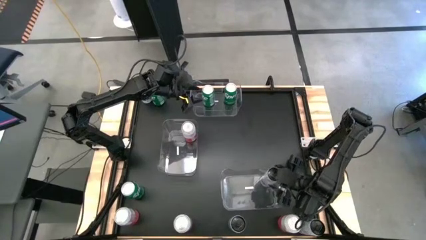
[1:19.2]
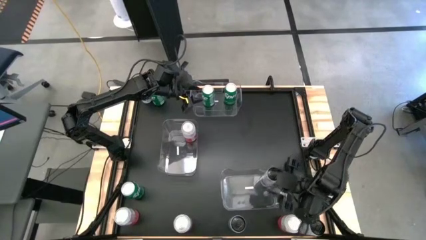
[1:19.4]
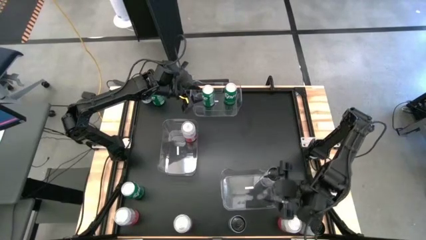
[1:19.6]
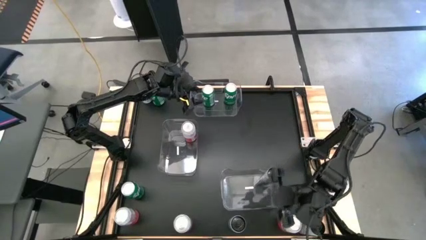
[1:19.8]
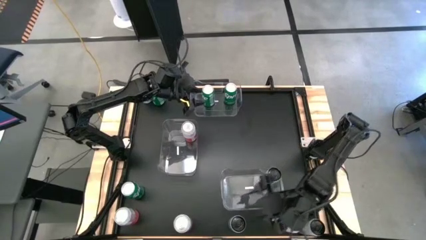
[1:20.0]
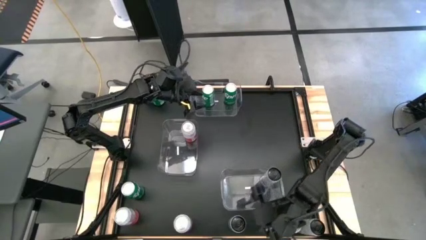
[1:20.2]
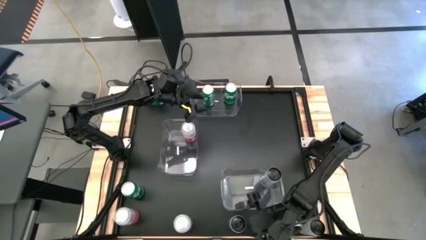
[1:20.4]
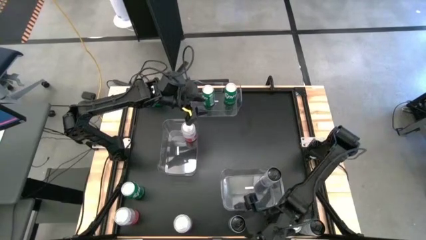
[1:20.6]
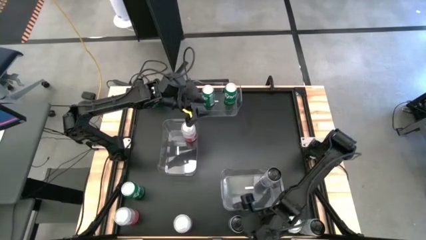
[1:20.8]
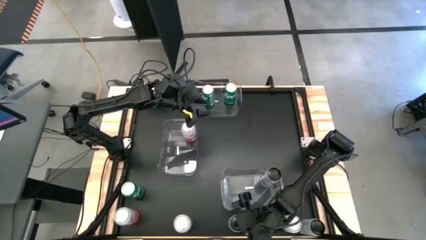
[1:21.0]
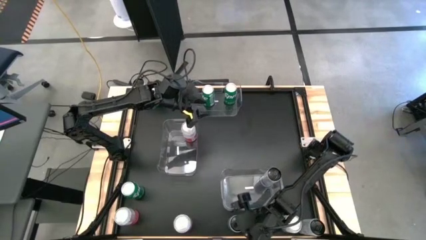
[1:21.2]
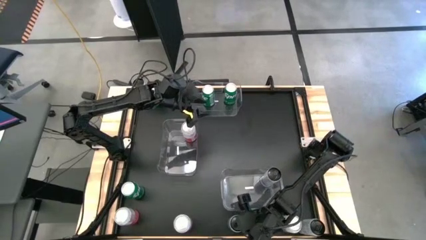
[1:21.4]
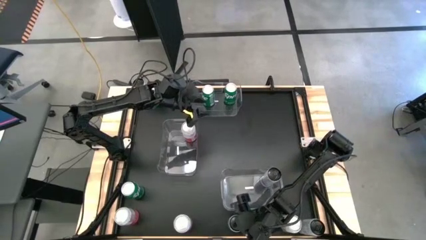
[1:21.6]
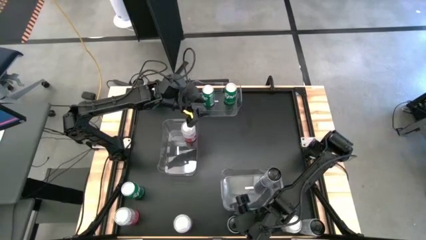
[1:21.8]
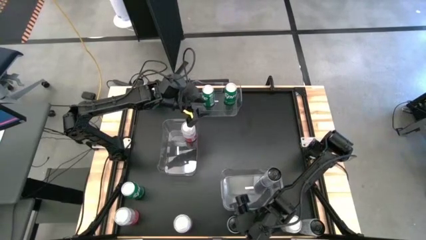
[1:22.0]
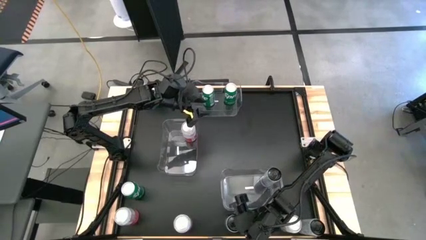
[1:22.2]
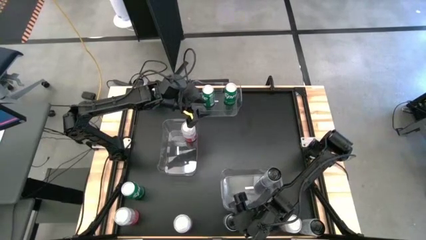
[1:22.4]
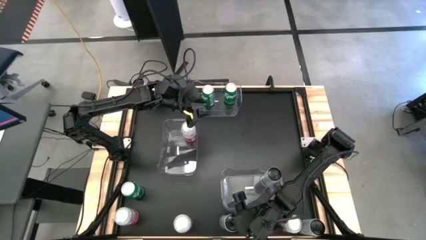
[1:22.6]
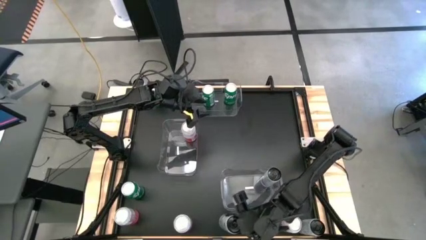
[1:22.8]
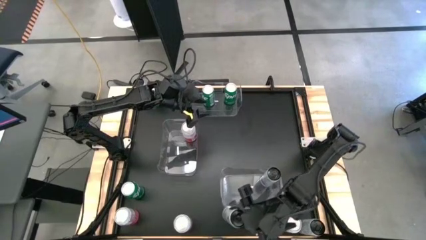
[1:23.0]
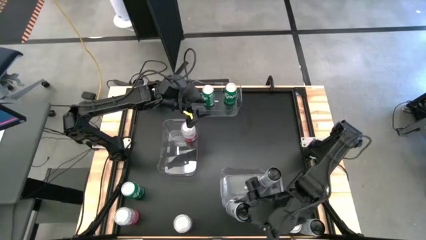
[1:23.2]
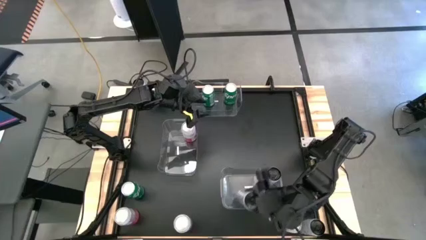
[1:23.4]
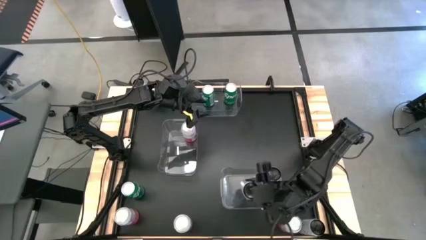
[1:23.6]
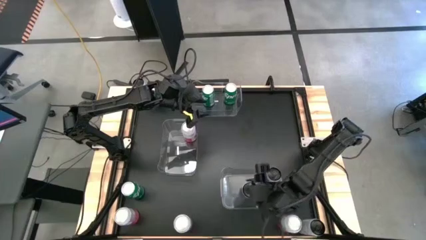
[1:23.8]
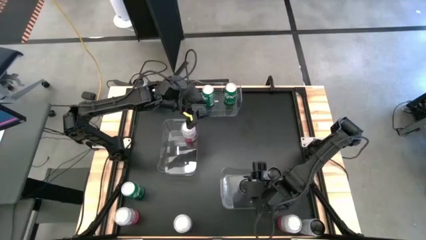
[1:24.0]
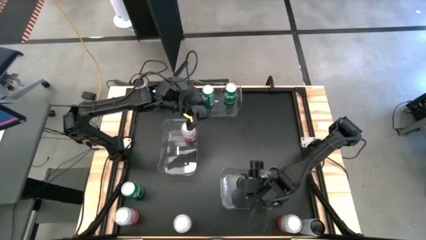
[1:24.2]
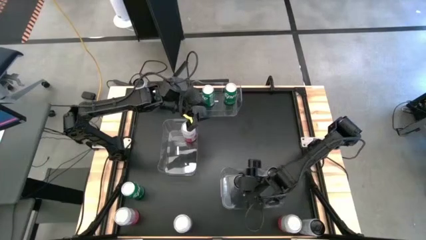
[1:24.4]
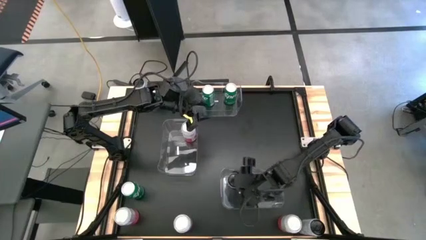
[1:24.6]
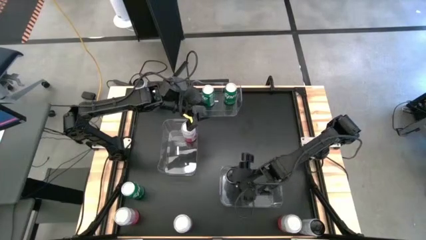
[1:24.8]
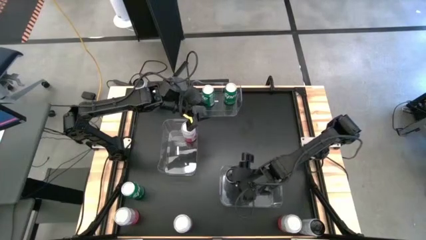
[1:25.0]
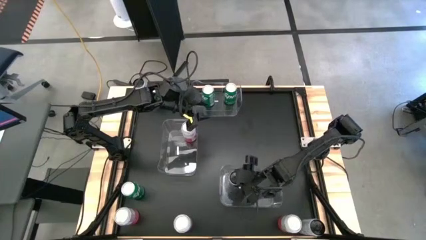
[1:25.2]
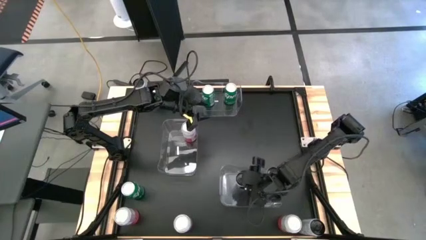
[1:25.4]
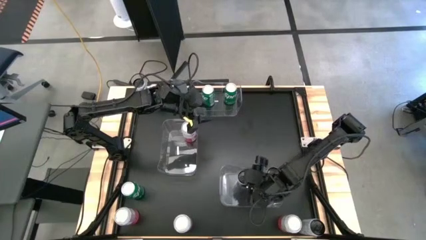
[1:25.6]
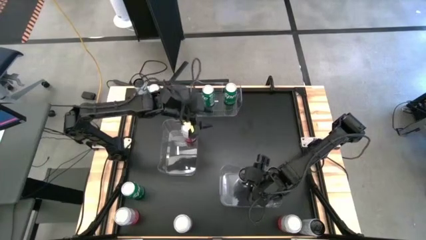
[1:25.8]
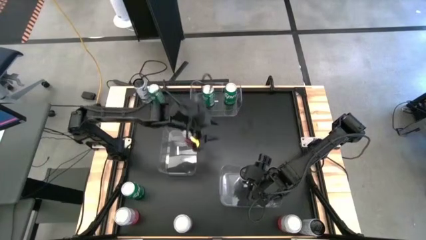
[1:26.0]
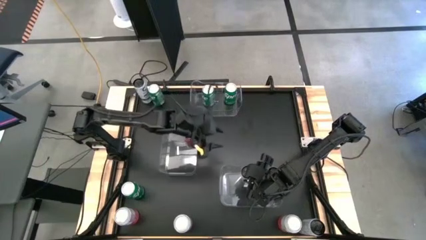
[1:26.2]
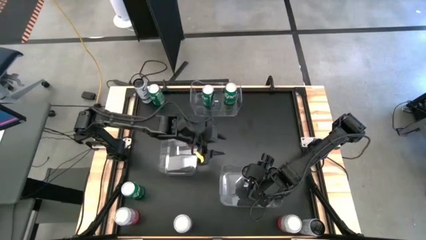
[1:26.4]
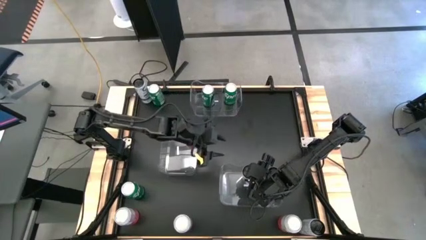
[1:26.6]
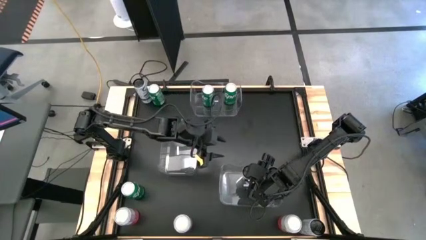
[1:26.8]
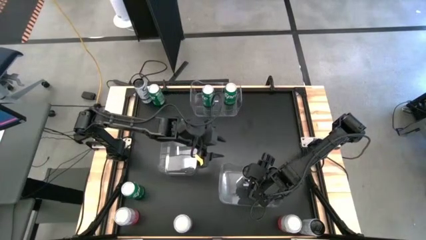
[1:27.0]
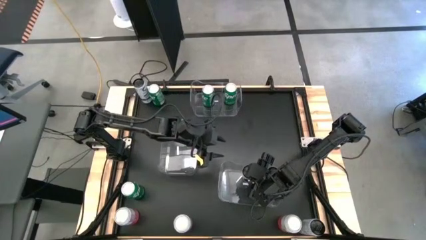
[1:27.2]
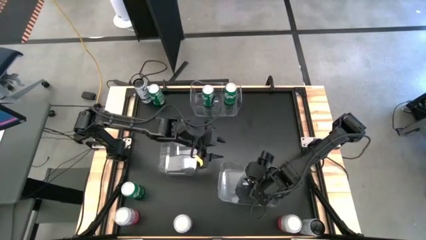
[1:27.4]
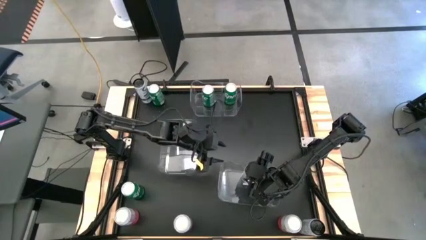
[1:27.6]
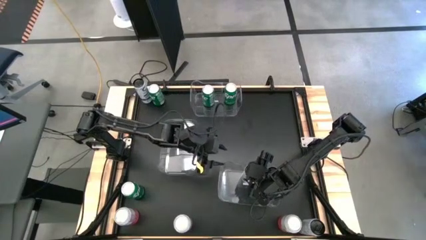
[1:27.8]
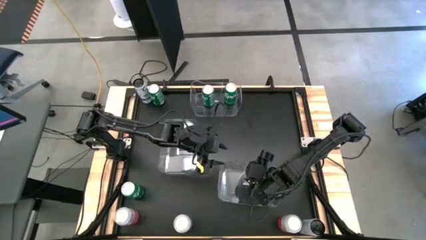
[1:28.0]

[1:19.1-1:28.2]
Task: Sort soda cans
Put the white soda can into the bottom transparent bin
